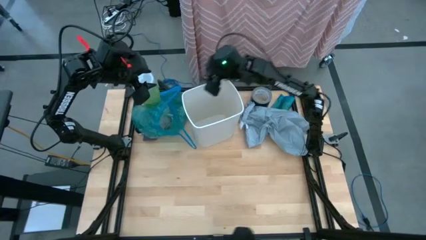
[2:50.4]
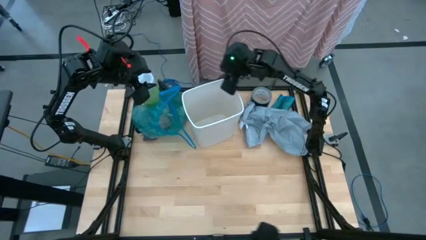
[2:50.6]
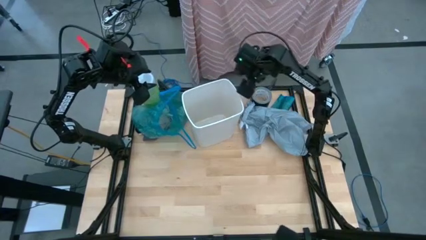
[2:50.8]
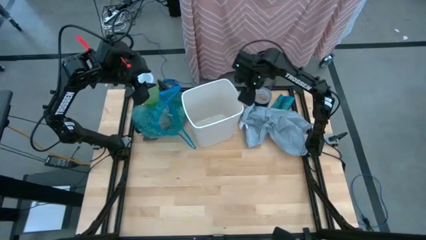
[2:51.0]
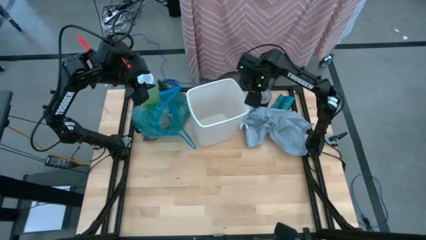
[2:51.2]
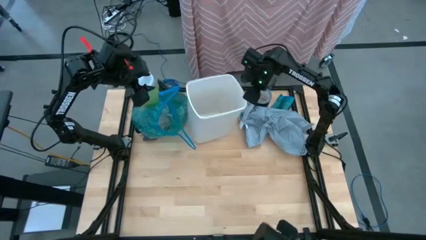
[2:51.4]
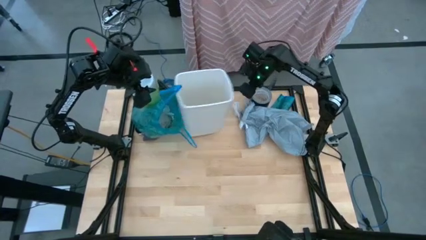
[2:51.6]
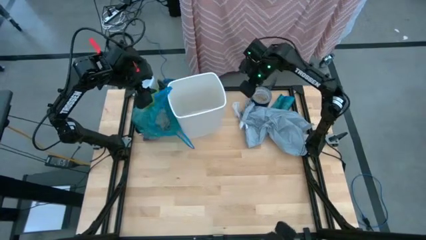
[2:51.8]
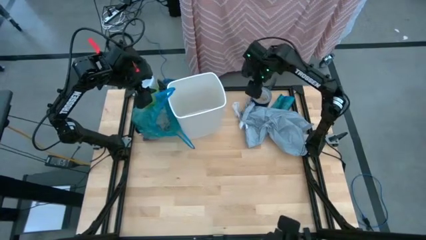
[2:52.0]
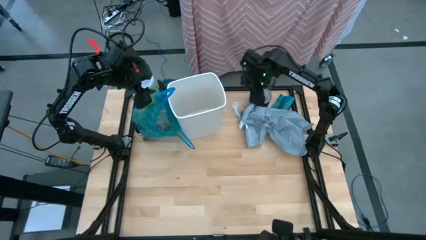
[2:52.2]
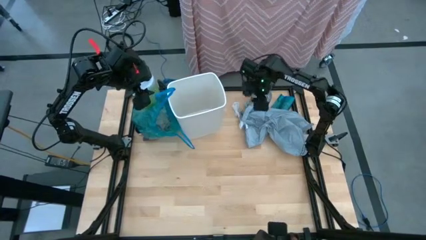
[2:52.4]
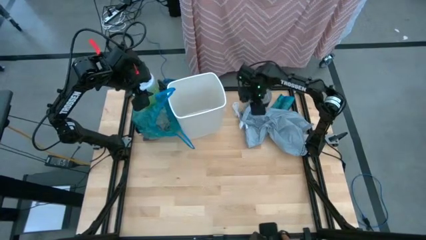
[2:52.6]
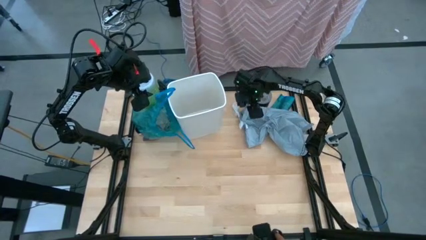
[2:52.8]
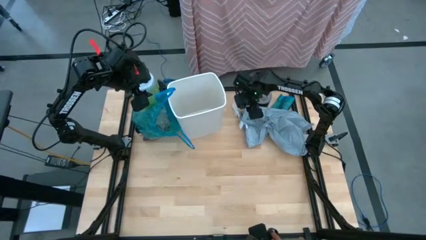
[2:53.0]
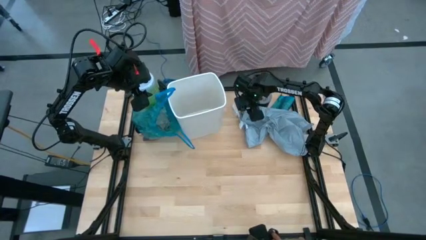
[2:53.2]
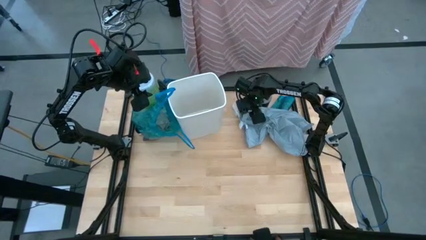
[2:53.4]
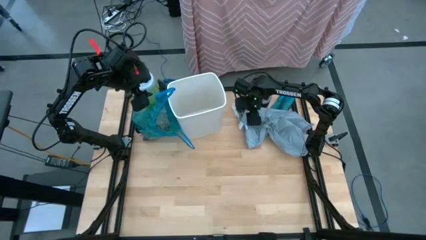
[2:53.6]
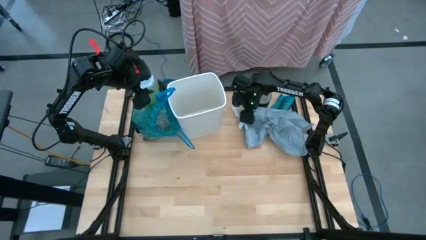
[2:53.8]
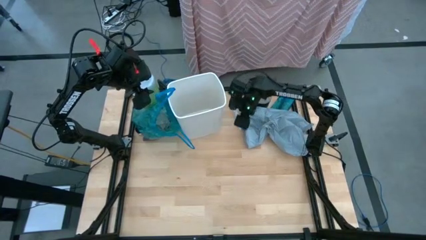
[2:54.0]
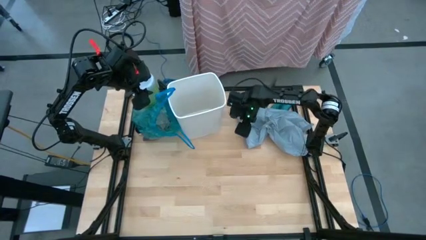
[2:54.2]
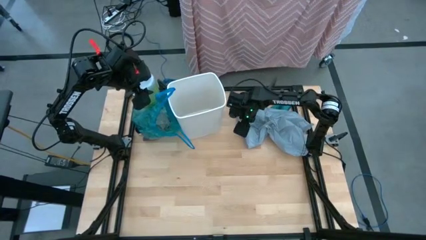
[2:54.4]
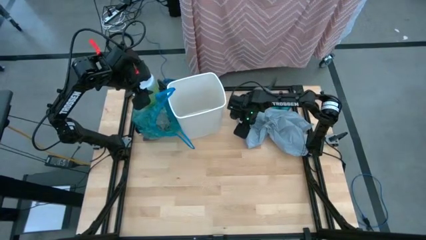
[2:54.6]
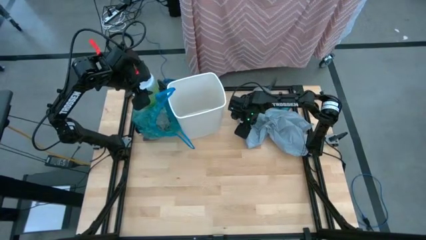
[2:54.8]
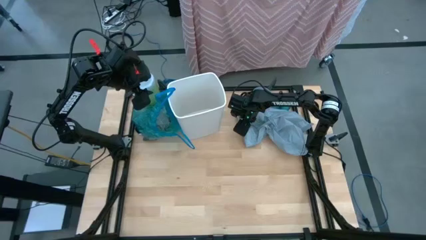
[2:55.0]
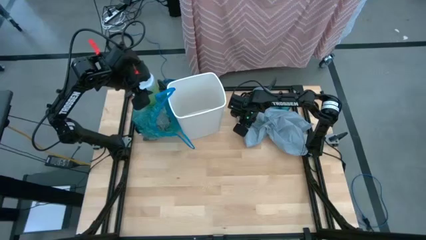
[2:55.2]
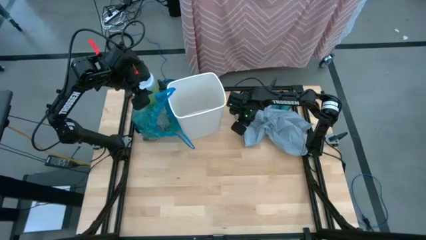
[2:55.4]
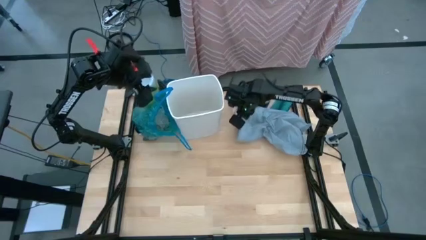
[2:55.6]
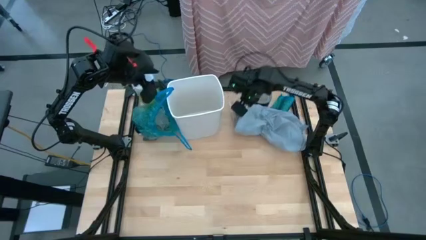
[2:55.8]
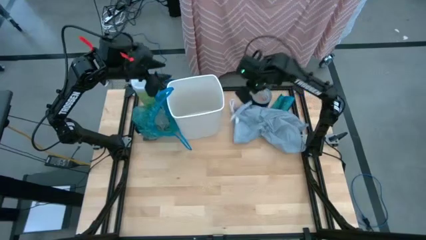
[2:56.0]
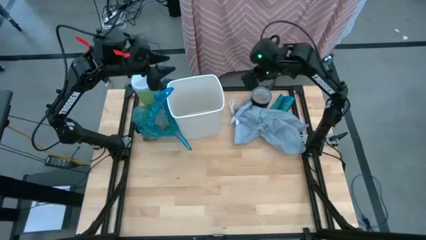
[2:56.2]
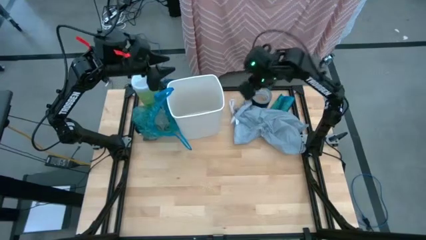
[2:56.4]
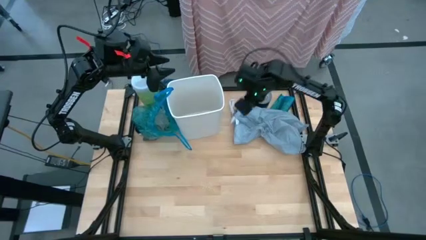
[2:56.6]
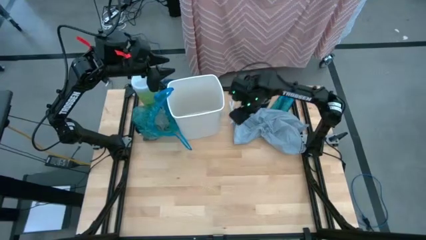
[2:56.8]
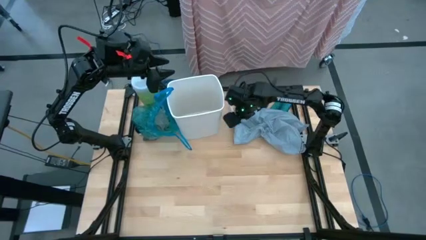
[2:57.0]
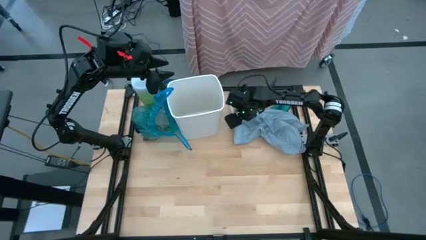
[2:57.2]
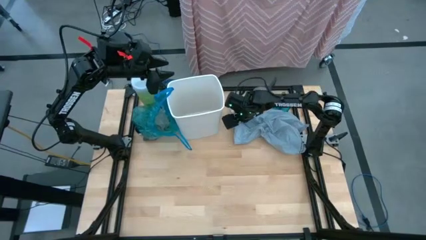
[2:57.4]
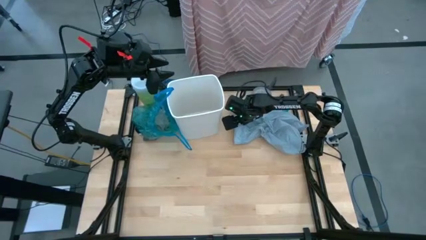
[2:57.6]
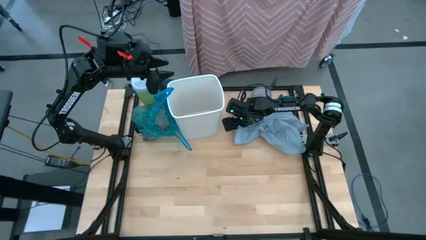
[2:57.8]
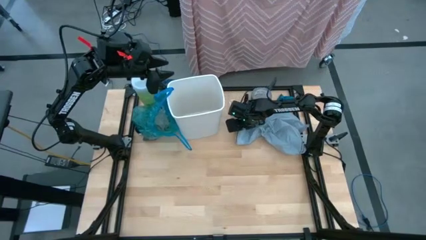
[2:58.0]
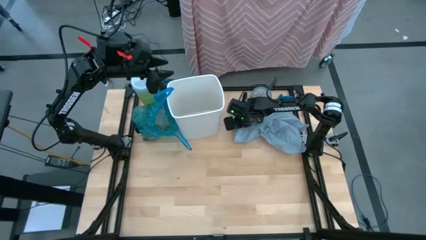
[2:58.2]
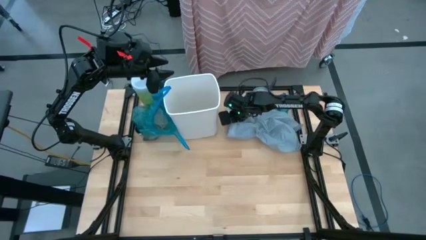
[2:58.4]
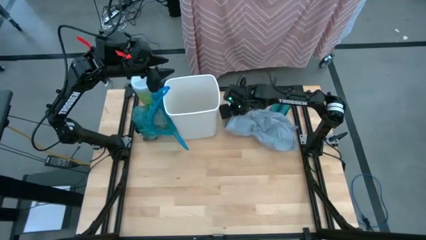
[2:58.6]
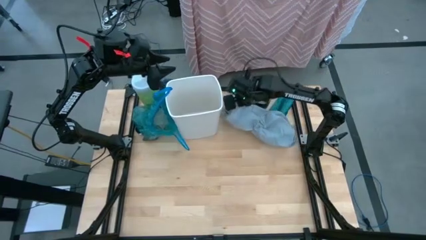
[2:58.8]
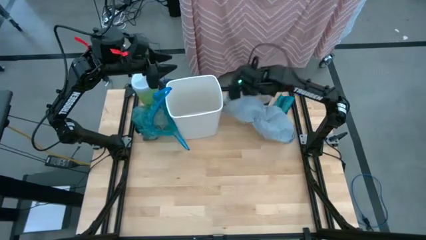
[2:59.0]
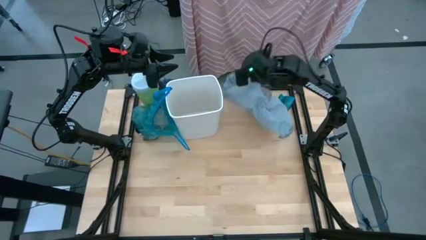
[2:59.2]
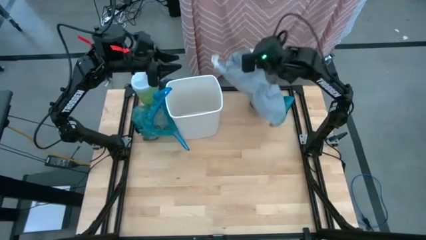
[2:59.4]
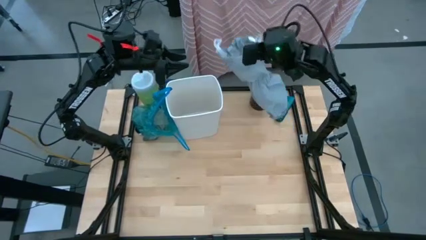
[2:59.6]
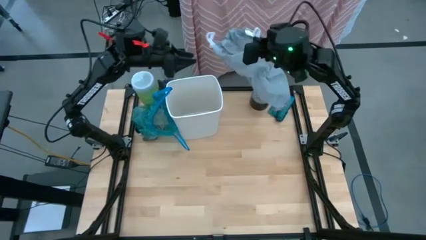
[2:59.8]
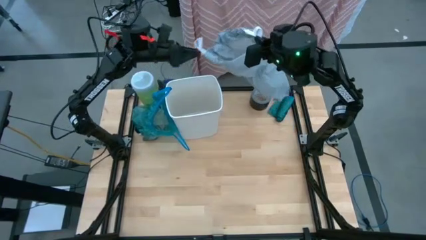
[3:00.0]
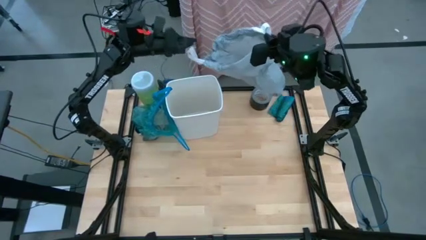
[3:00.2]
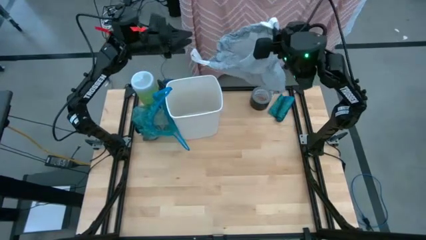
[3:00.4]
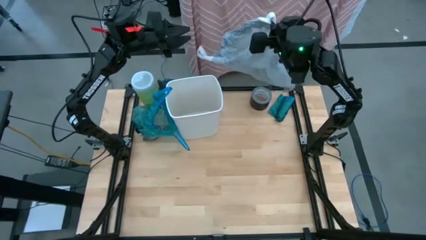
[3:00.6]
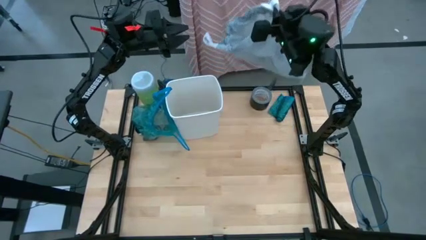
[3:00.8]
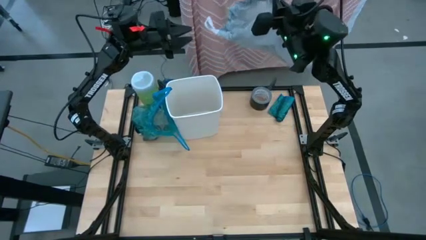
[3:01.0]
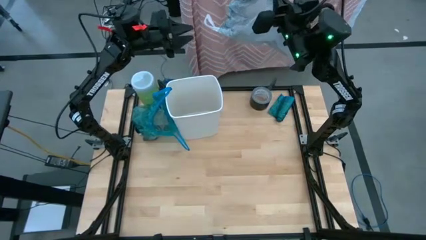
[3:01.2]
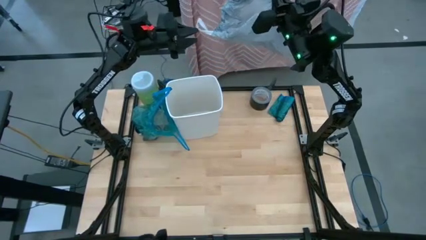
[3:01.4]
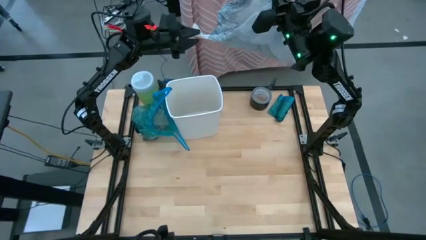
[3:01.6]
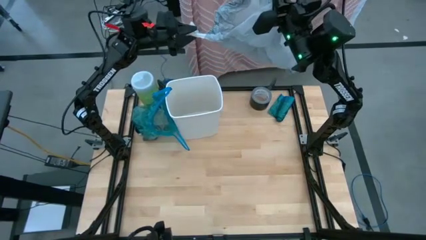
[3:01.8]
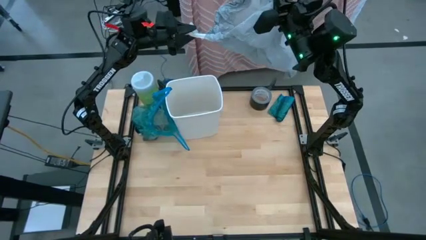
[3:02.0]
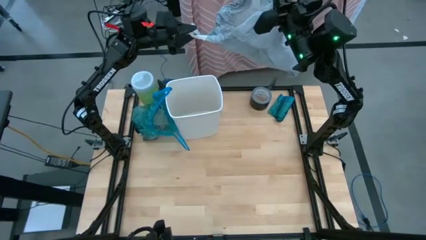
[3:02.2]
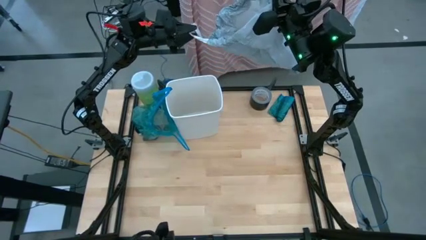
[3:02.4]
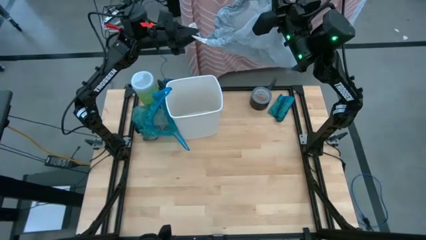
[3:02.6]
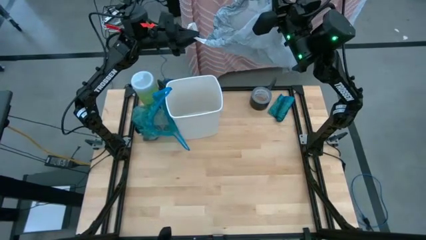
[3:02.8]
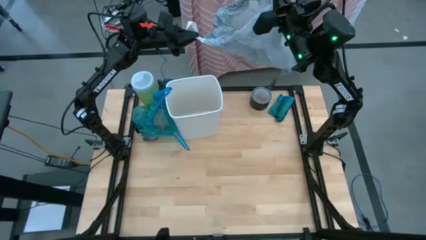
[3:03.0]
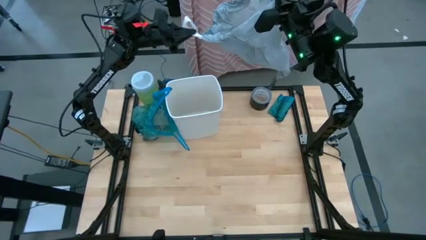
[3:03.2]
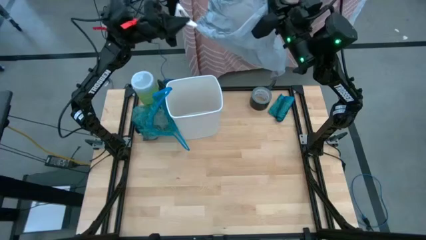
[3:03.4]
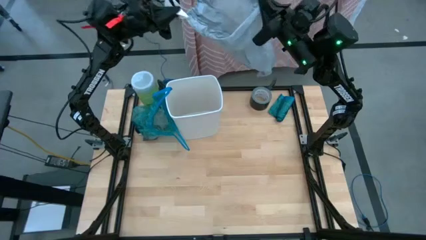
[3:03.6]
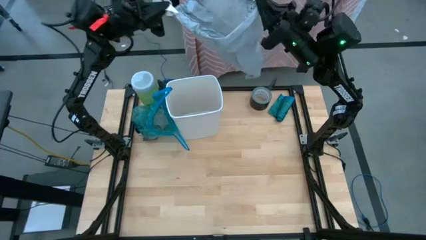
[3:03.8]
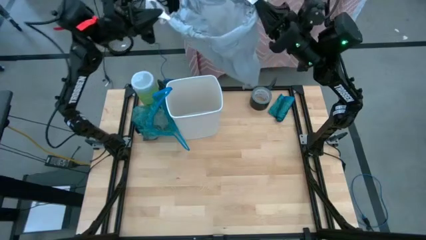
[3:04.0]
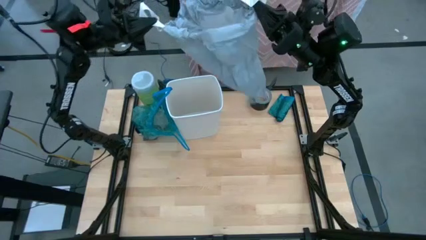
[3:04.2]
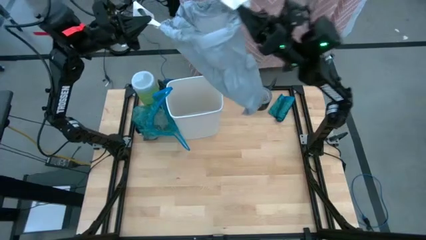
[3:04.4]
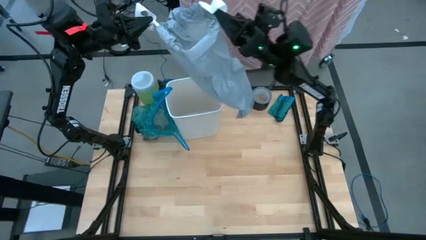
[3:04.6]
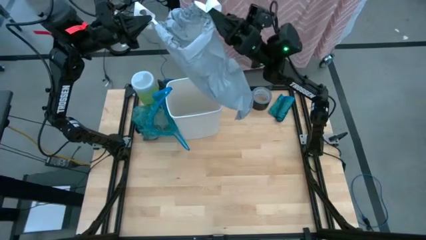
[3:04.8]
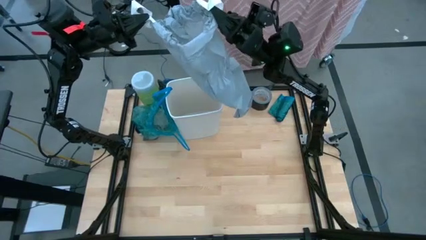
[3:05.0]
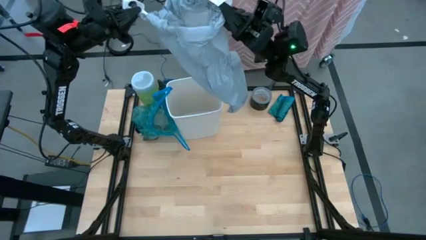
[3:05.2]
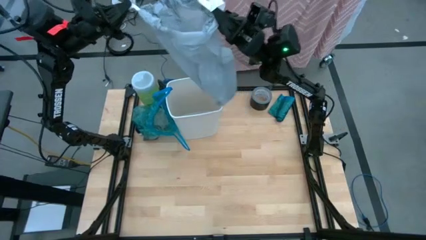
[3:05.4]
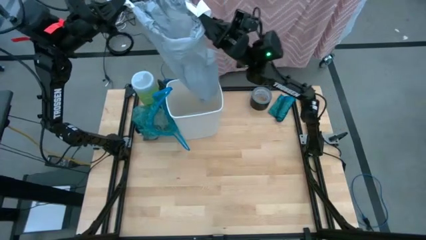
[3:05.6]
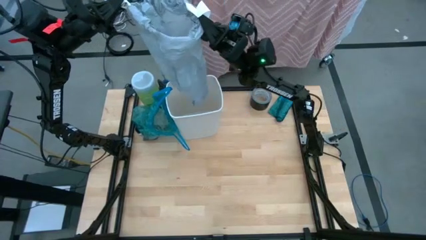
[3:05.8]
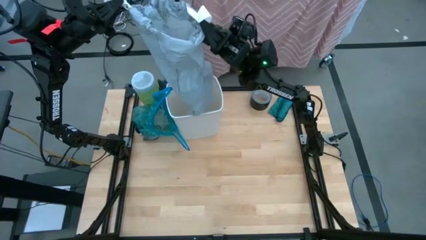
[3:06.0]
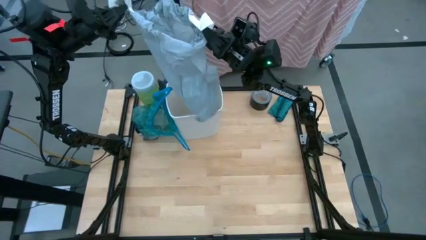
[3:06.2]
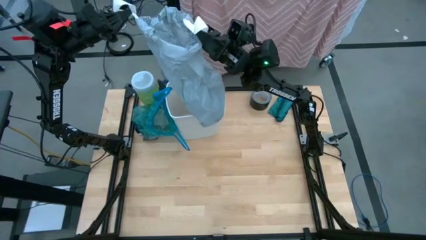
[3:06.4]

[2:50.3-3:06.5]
Task: place trash/remove bag and relplace
Insert the gray trash bag into the trash bin

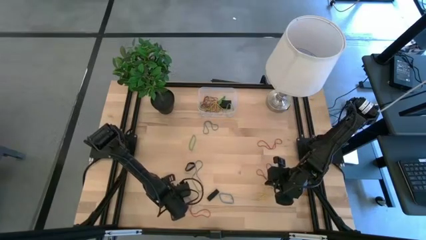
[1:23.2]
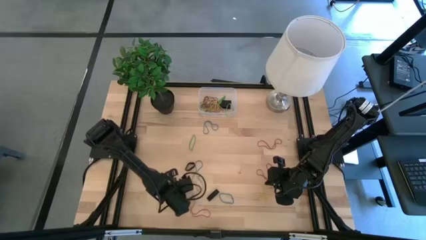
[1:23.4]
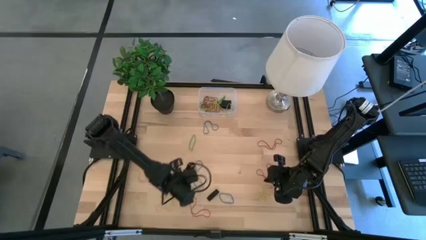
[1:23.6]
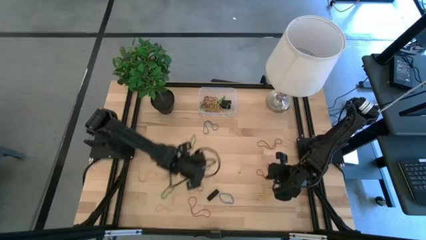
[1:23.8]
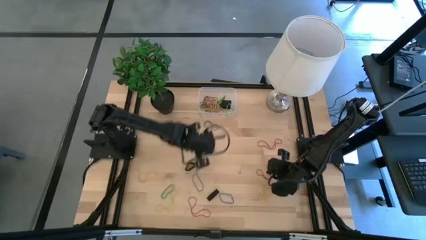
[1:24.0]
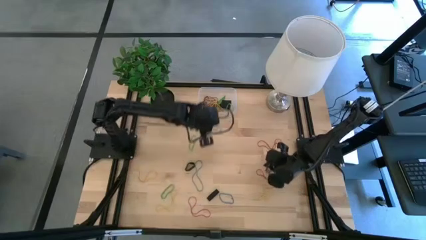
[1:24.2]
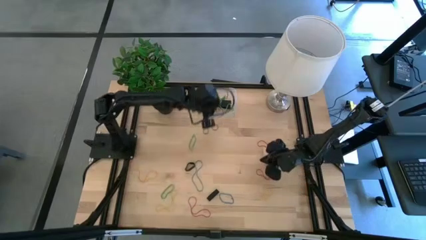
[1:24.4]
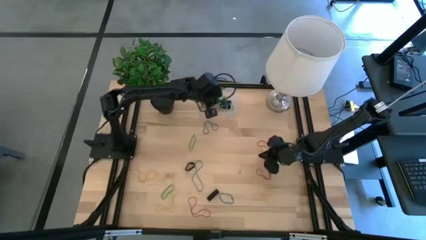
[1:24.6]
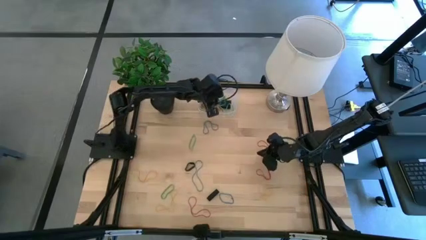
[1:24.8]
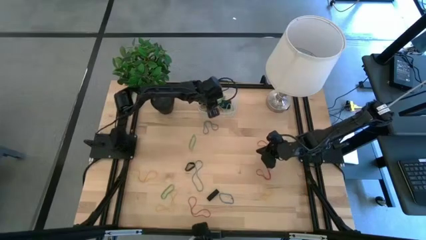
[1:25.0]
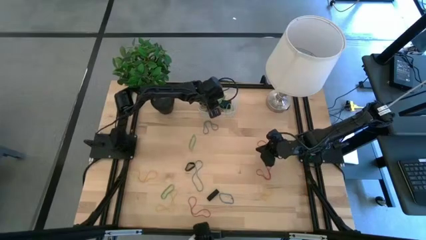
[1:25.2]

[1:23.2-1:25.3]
Task: Pick and place rubber bands into bin
Put the blue rubber band into the transparent bin
